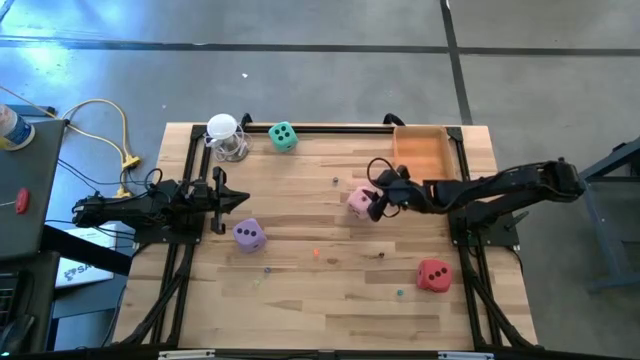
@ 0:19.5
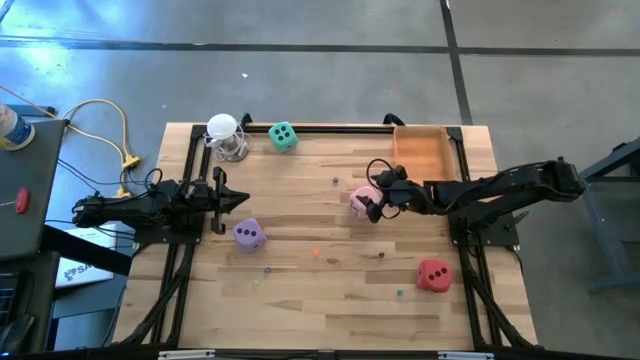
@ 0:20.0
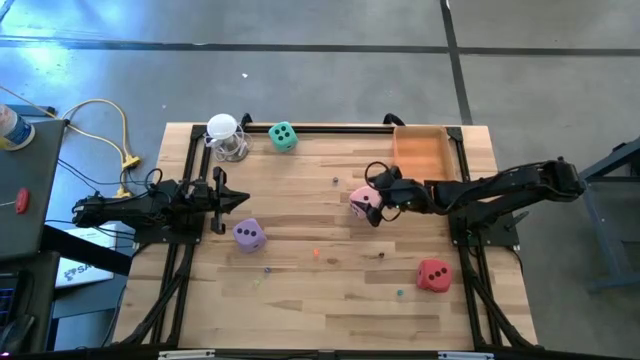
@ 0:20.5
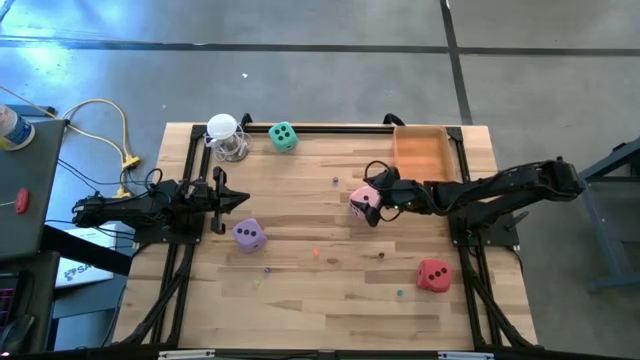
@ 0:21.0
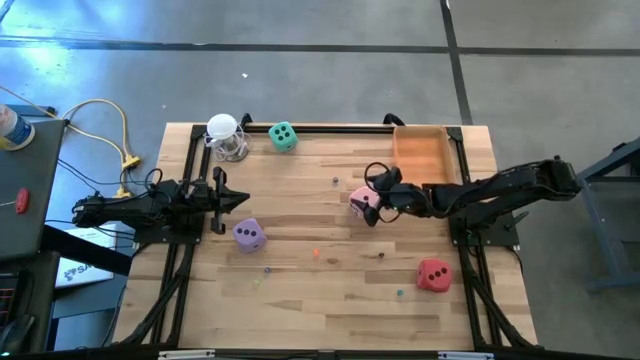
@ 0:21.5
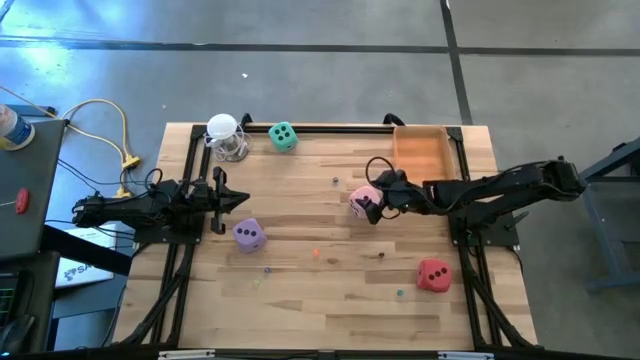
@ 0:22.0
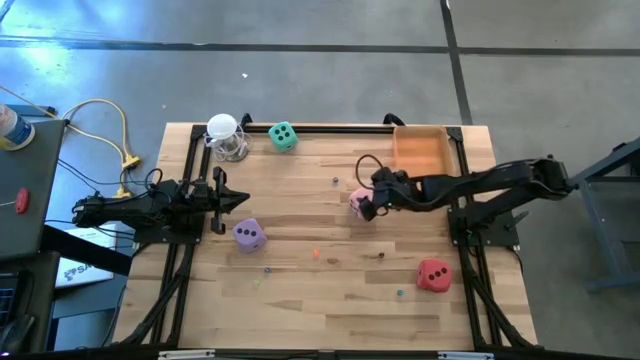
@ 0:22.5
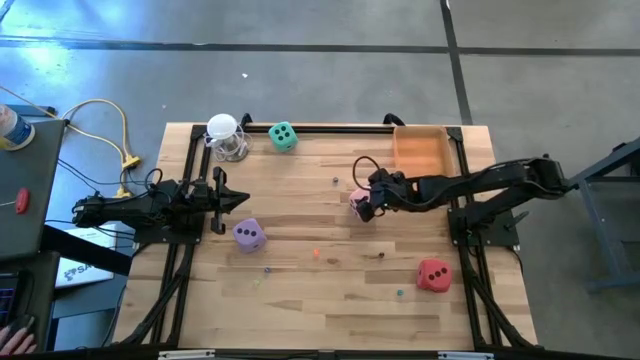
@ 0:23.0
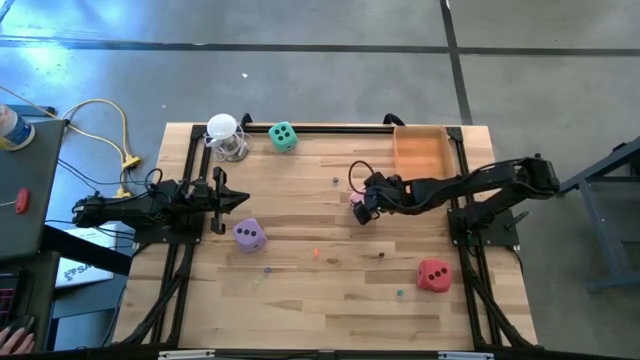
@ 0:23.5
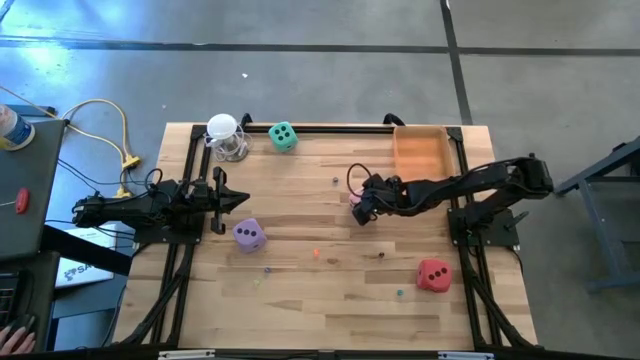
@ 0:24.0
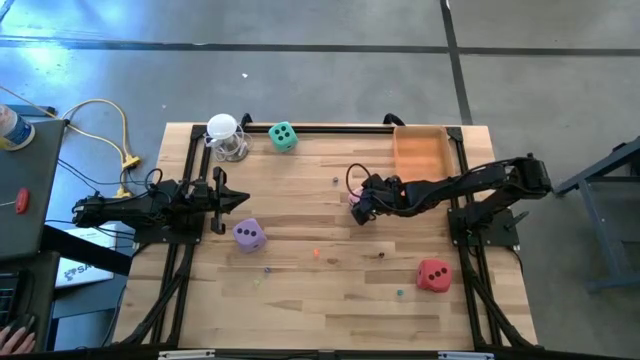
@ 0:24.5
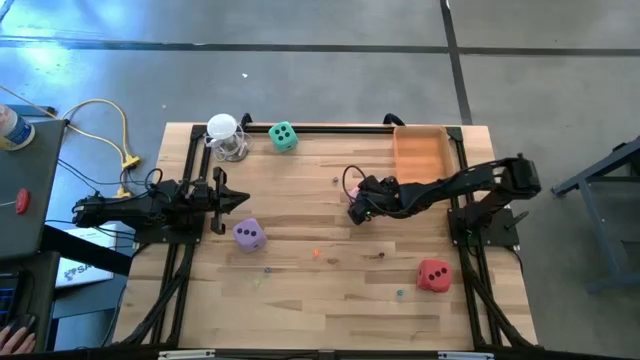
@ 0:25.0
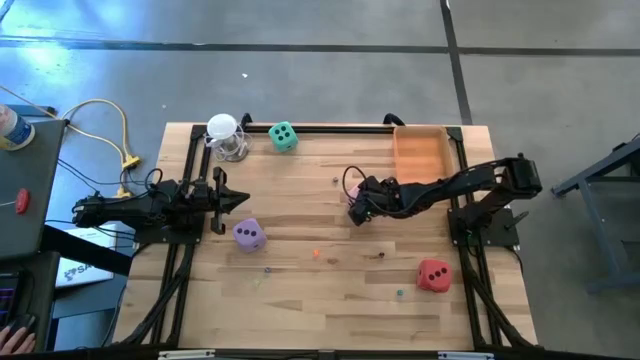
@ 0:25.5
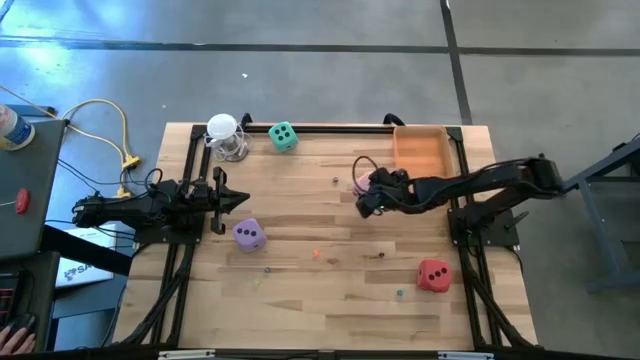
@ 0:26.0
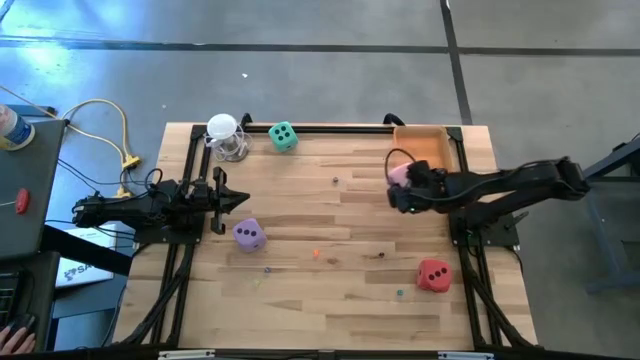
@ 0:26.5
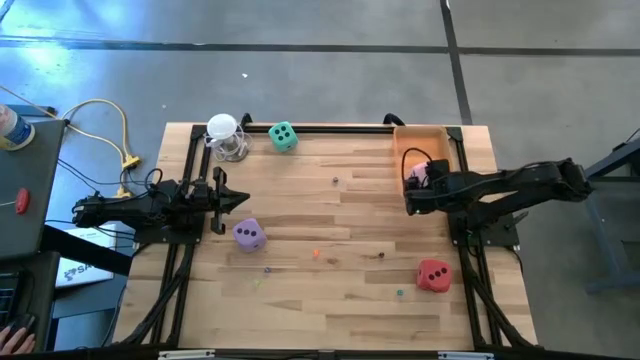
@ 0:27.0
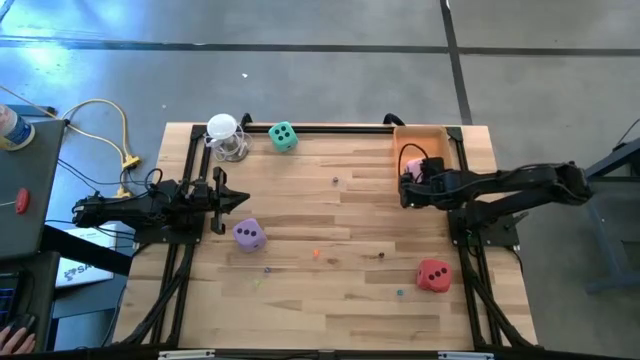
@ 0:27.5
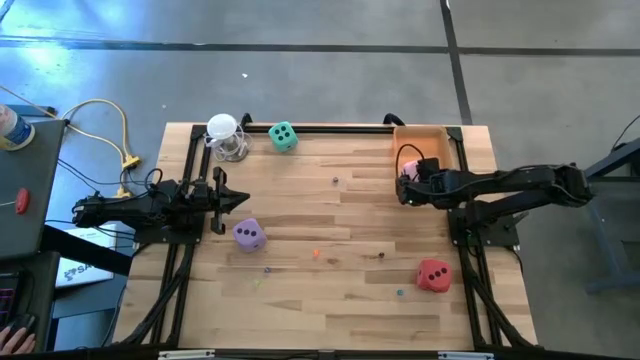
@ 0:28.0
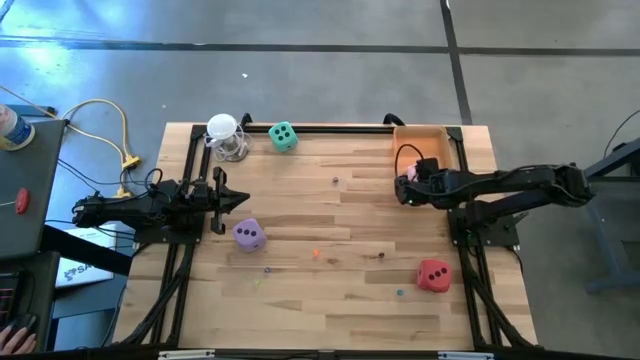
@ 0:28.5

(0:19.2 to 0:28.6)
Task: Pick & Place Dice
Put the pink large die into the orange bin

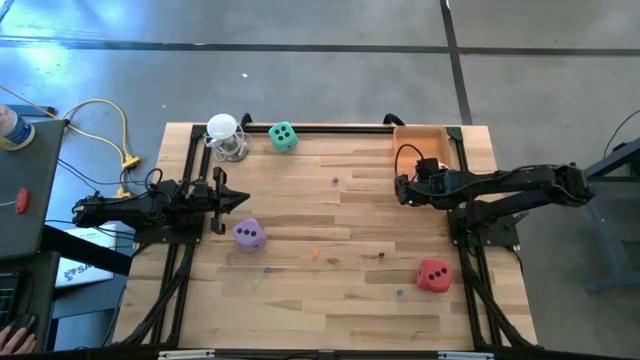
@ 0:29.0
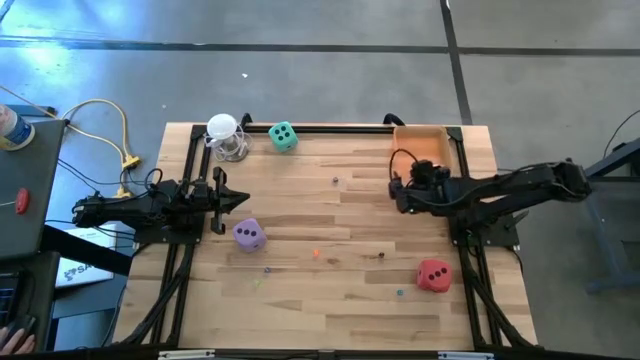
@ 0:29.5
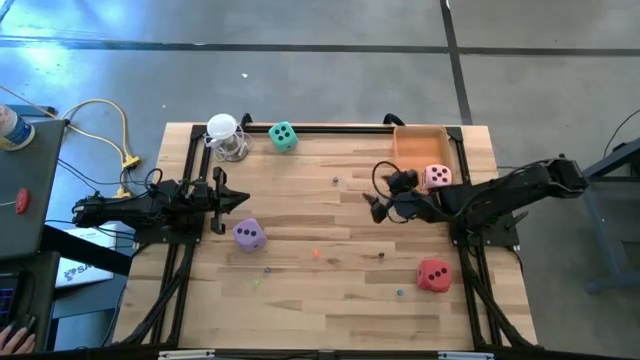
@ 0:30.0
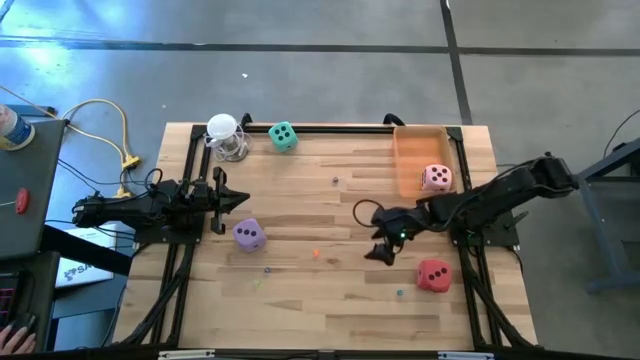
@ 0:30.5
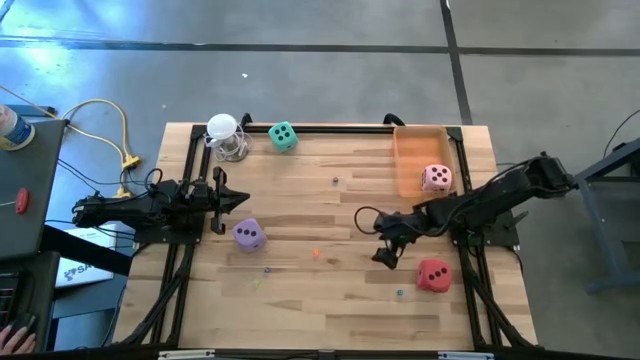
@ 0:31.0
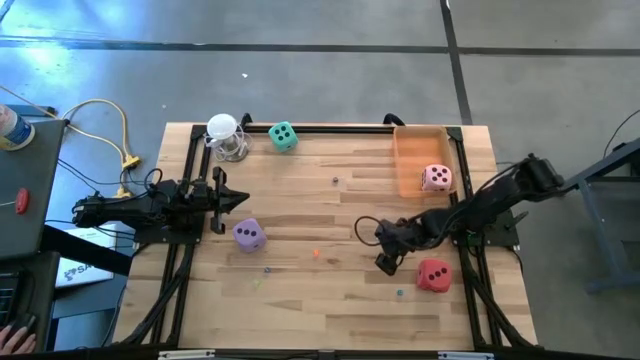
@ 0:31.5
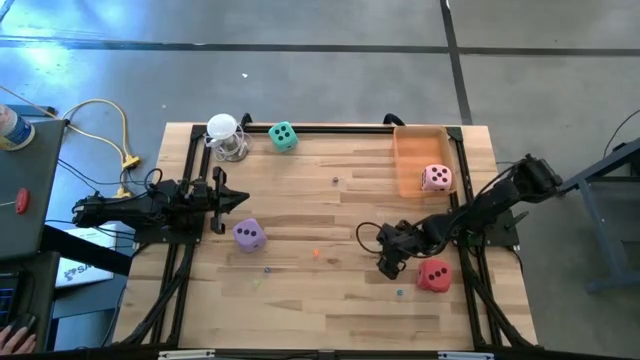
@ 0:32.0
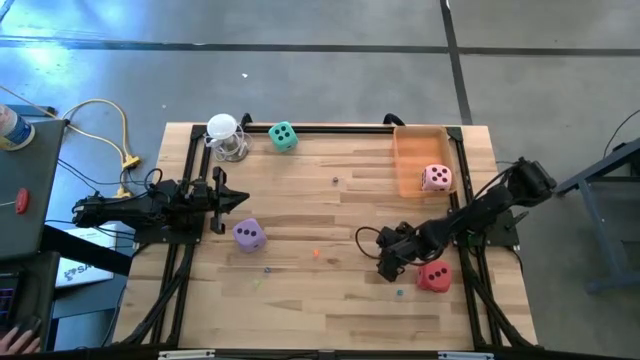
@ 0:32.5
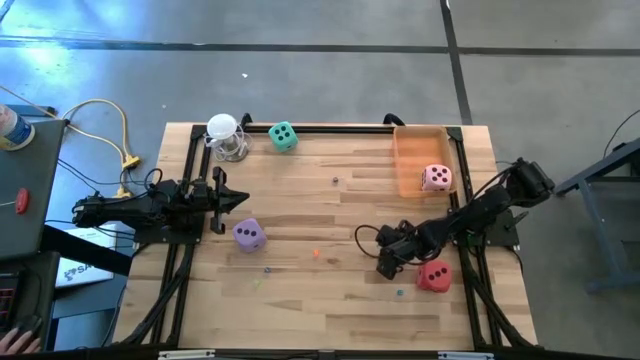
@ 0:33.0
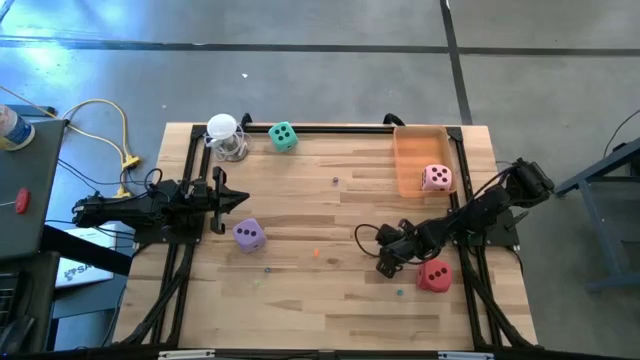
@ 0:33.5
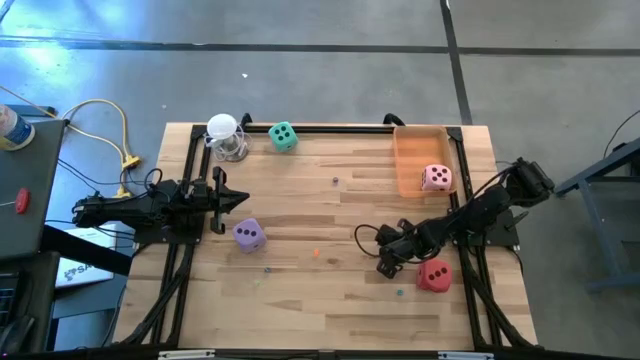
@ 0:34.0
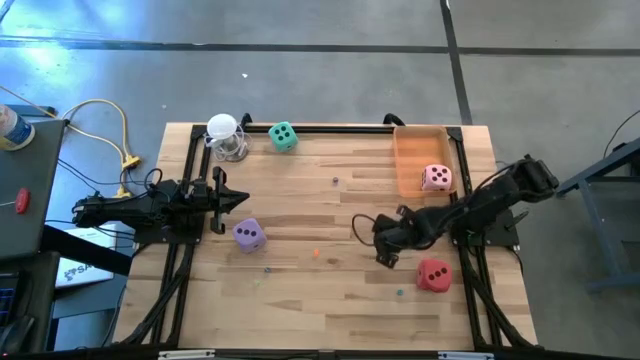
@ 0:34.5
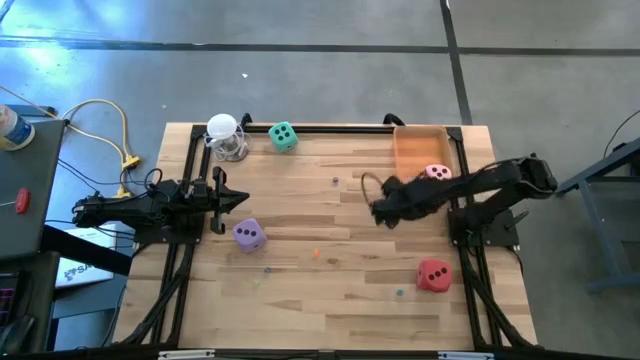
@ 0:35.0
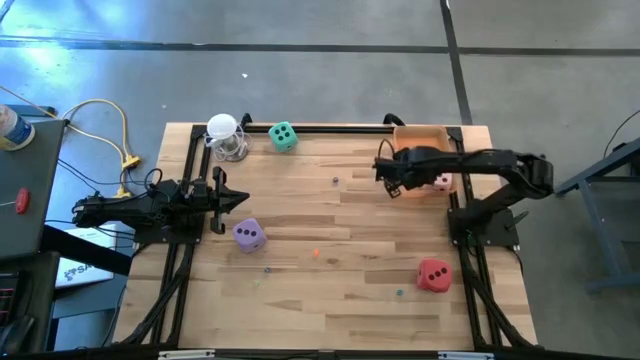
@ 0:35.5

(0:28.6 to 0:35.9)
Put the black small die into the orange bin

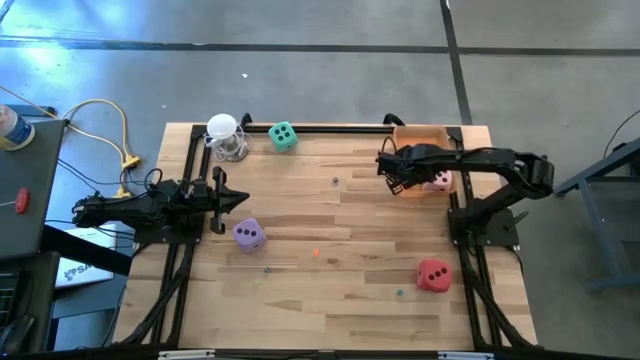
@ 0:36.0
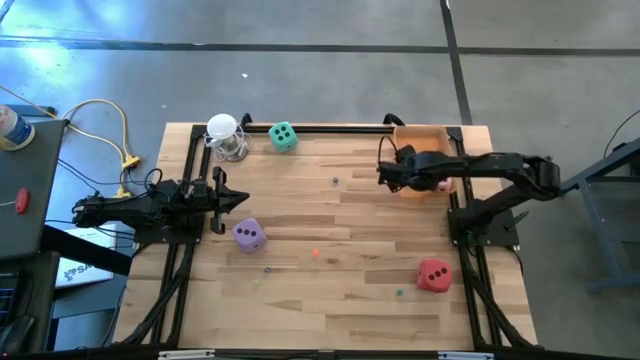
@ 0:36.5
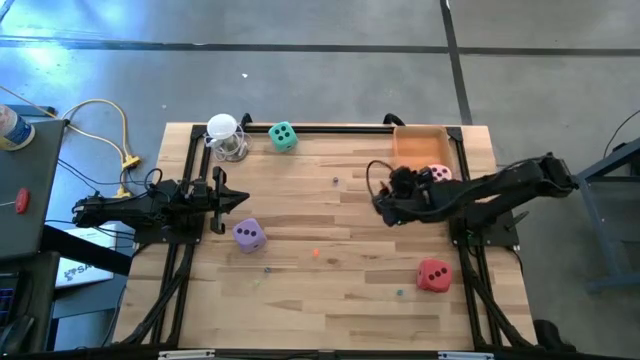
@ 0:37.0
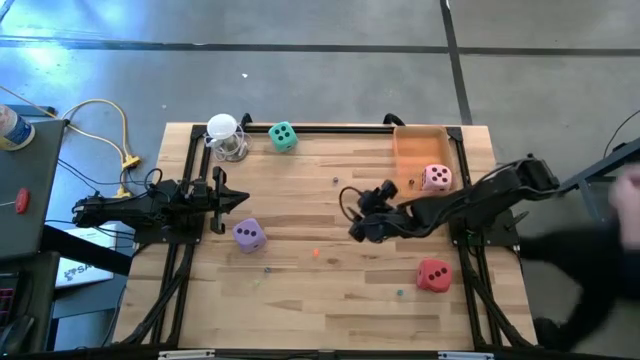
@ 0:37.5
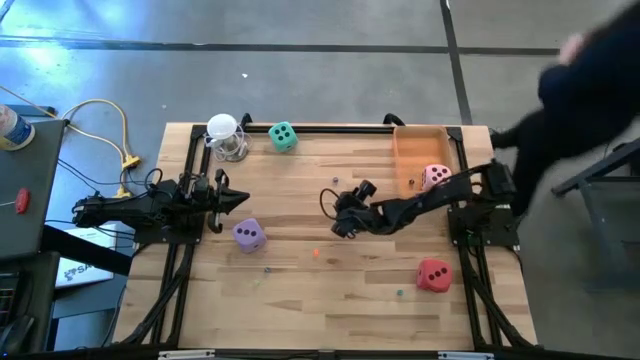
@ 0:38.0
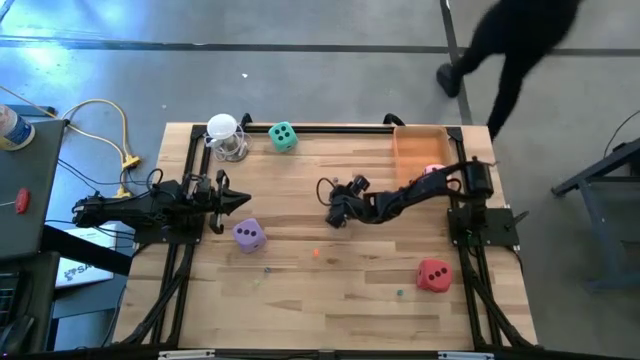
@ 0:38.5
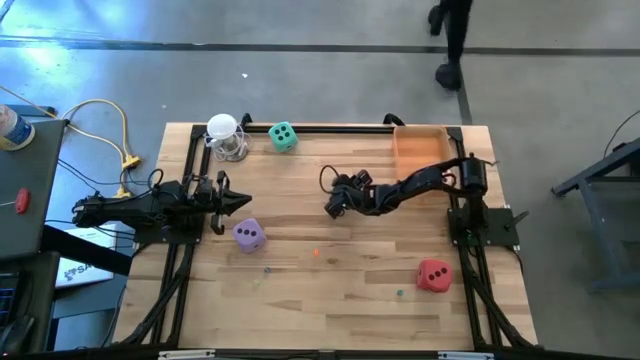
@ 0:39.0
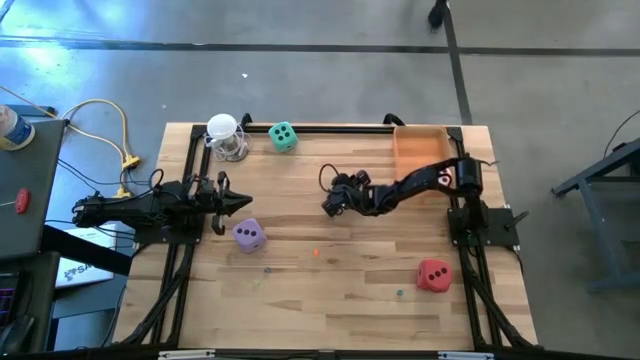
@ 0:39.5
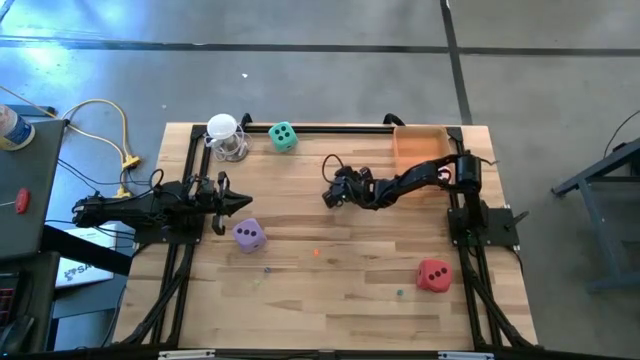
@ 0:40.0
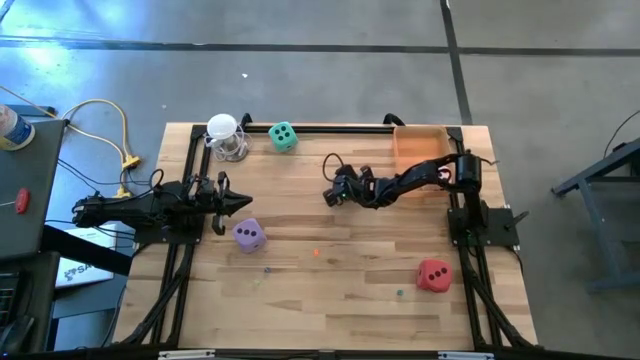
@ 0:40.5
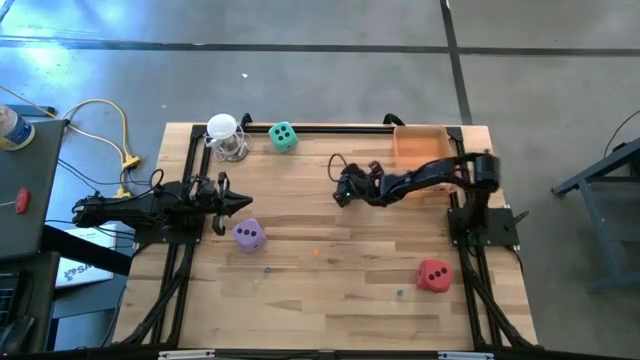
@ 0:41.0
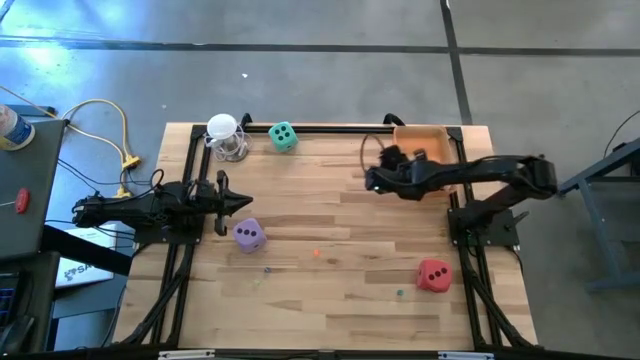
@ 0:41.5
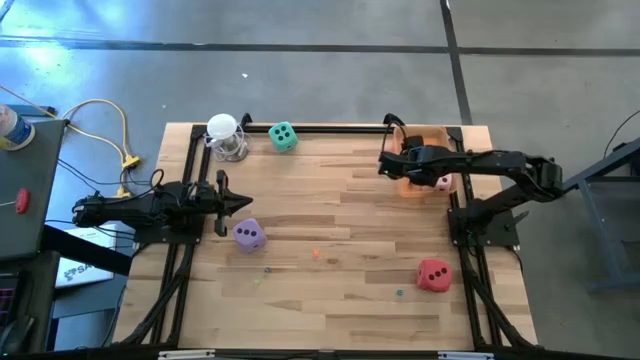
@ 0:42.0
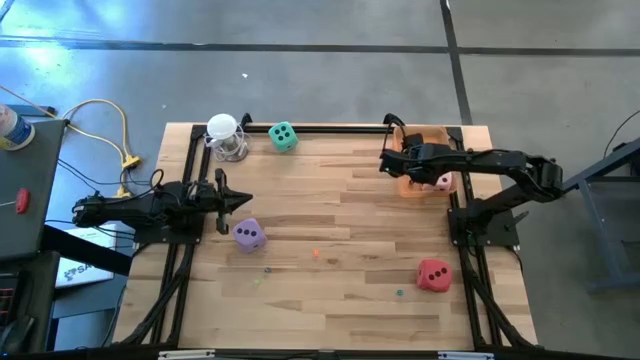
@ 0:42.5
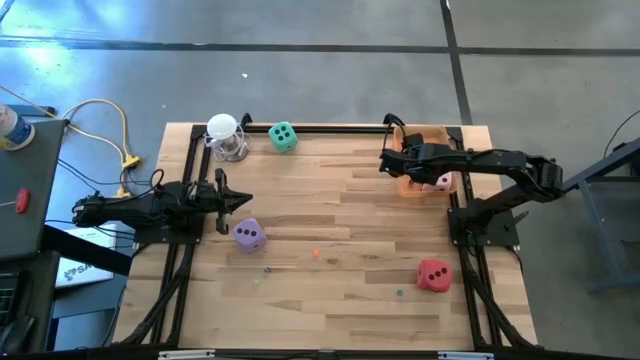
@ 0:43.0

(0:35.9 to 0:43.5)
Put the dark blue small die into the orange bin
